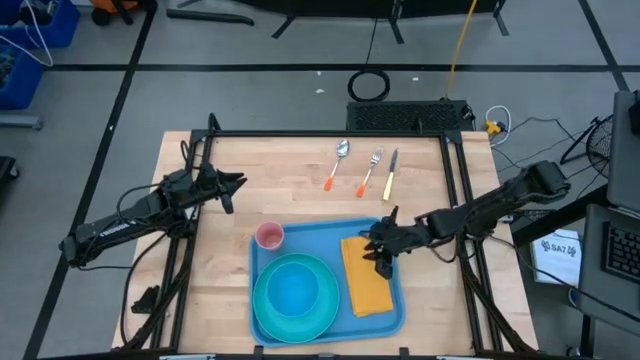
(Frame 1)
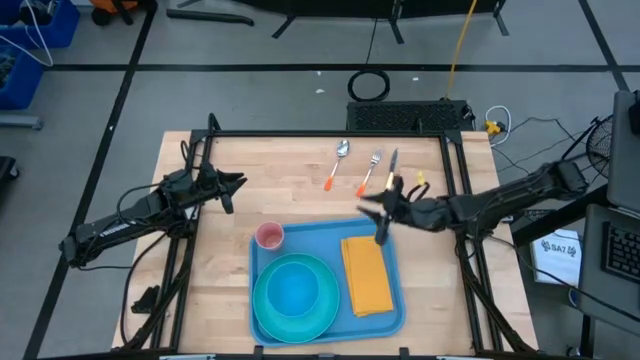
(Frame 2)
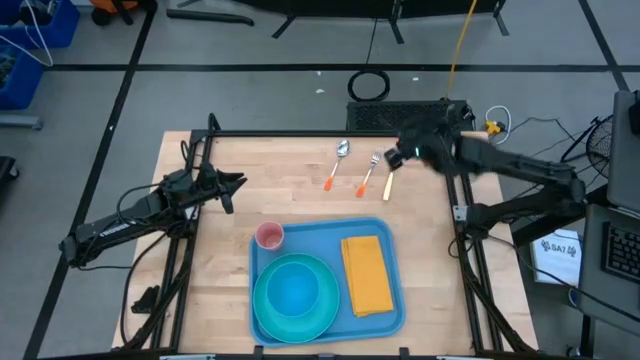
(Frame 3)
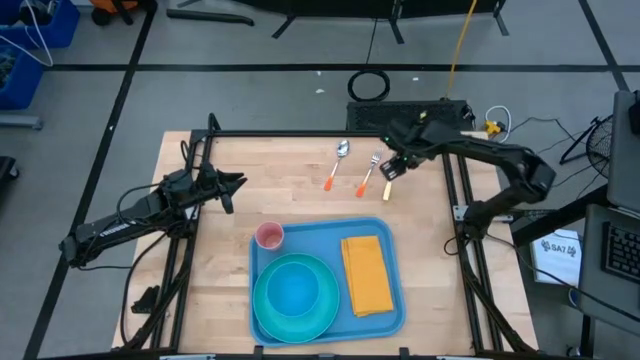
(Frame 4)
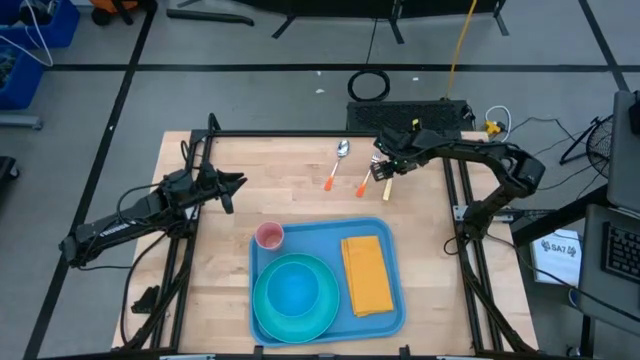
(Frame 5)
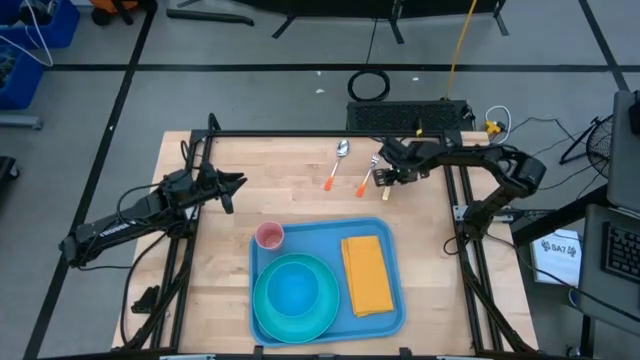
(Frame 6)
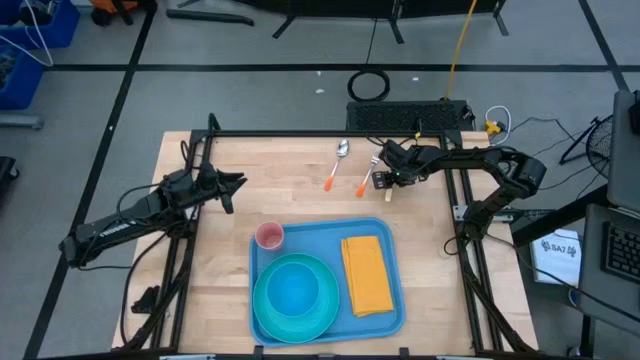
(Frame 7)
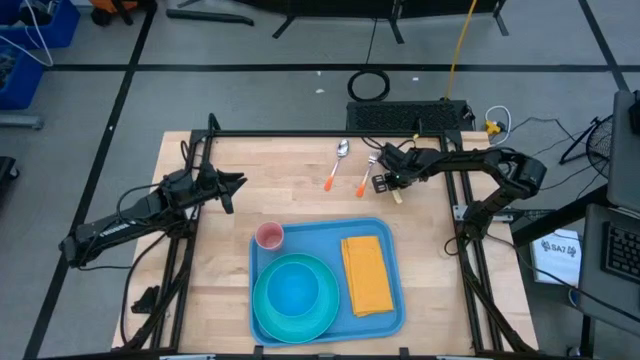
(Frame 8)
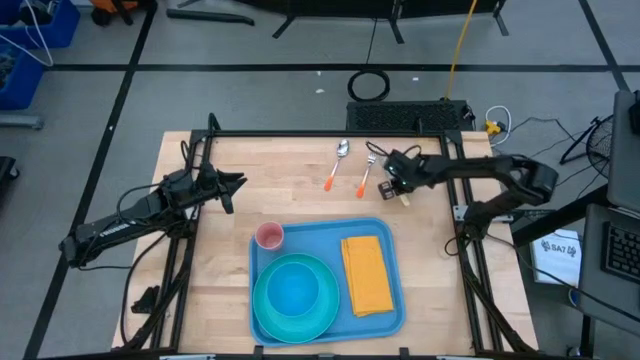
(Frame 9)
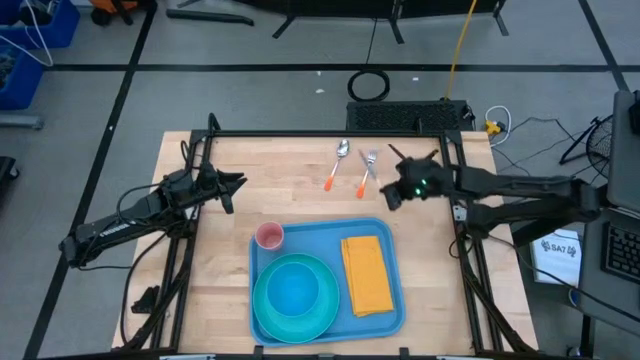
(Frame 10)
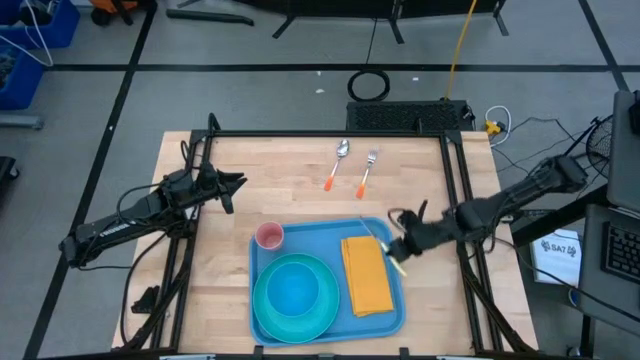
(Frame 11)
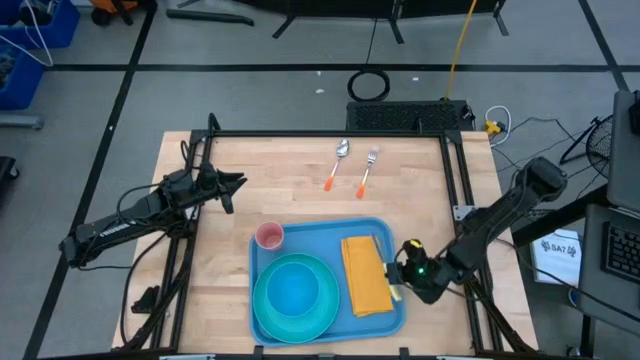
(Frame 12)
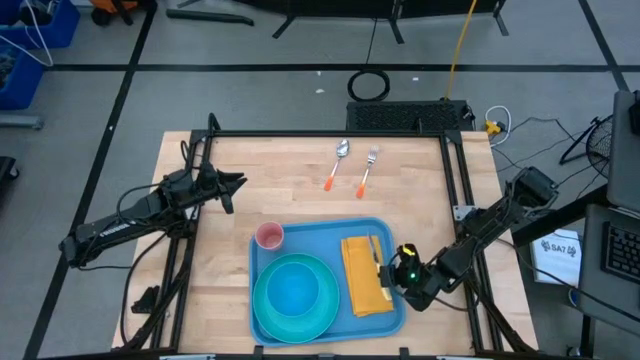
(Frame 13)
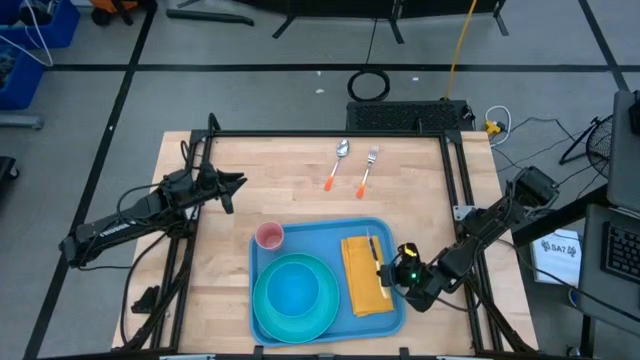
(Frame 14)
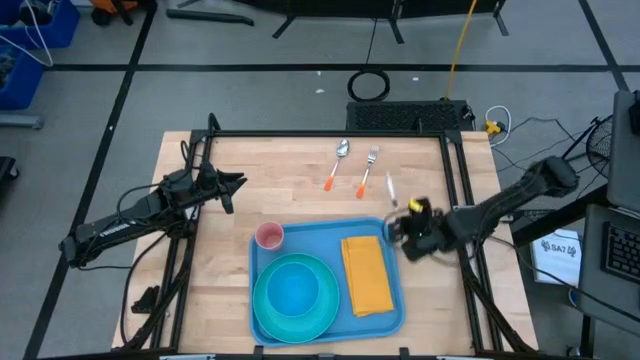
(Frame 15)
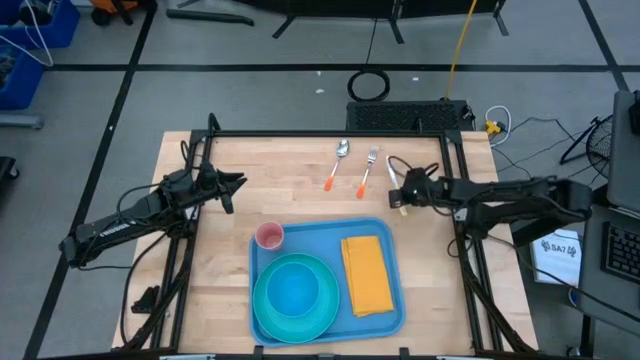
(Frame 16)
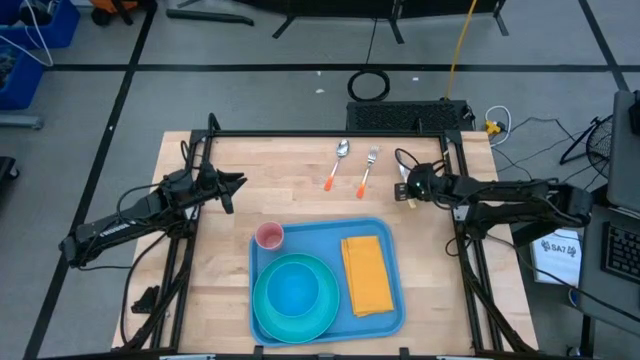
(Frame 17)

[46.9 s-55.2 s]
Task: Set up tray
Put the yellow knife on top of the yellow napkin on the blue tray

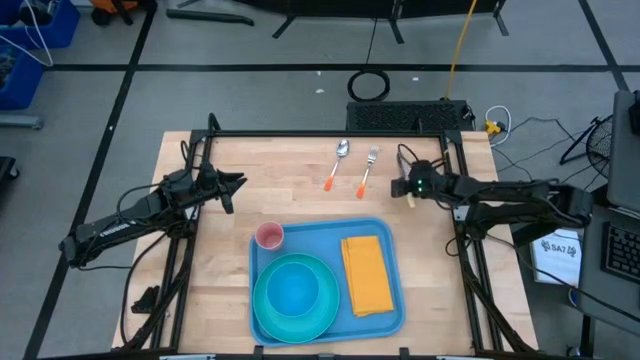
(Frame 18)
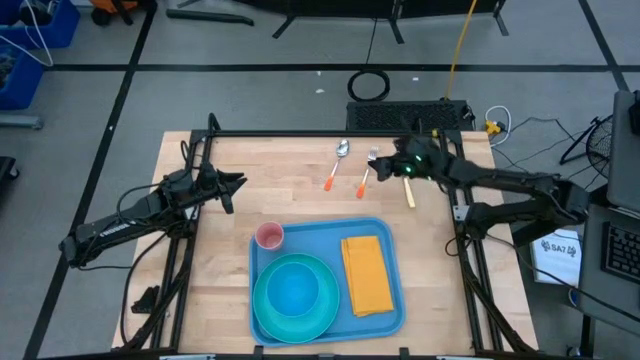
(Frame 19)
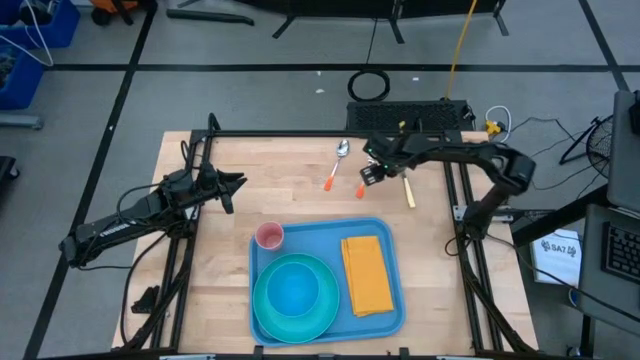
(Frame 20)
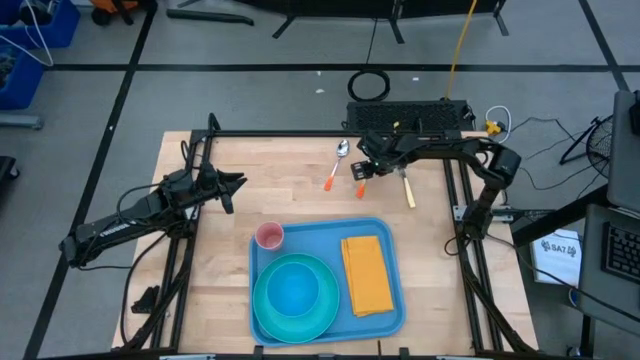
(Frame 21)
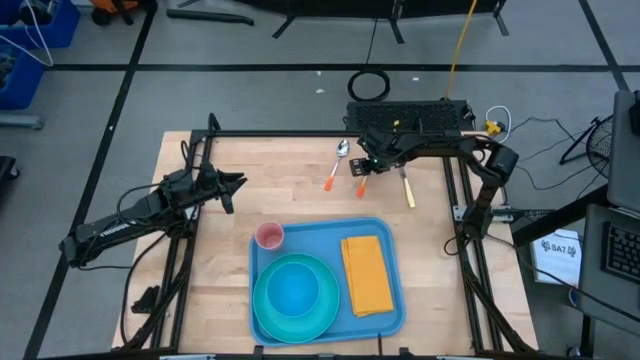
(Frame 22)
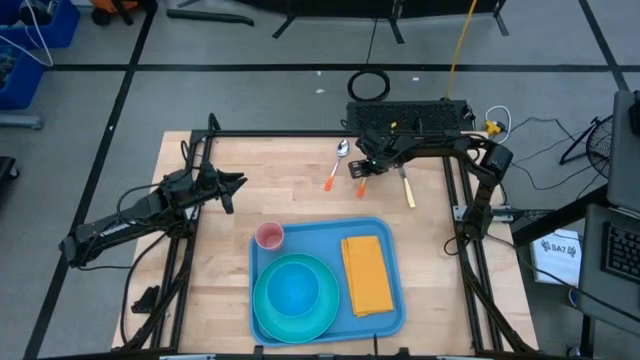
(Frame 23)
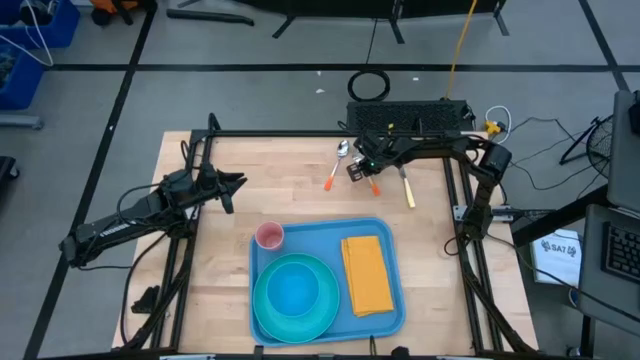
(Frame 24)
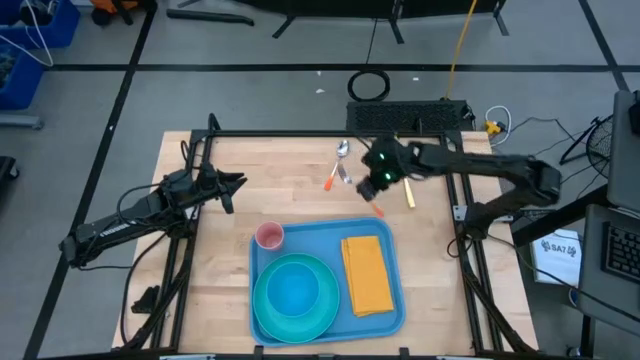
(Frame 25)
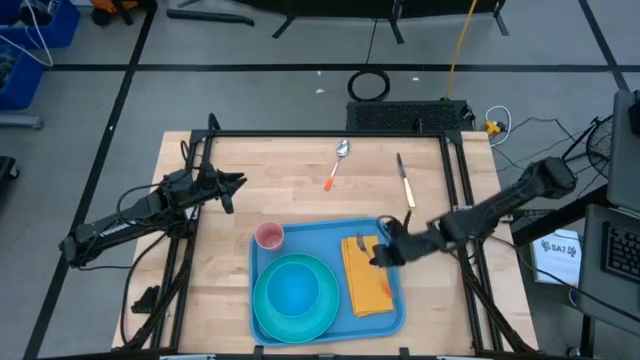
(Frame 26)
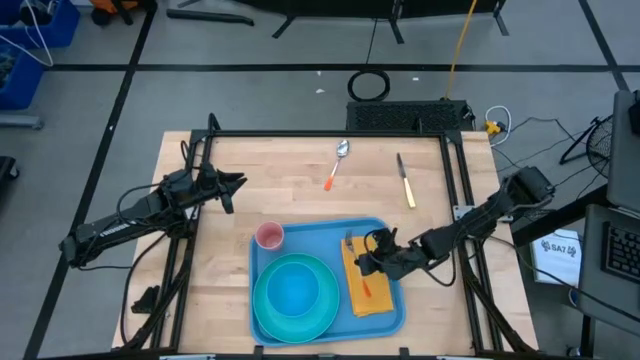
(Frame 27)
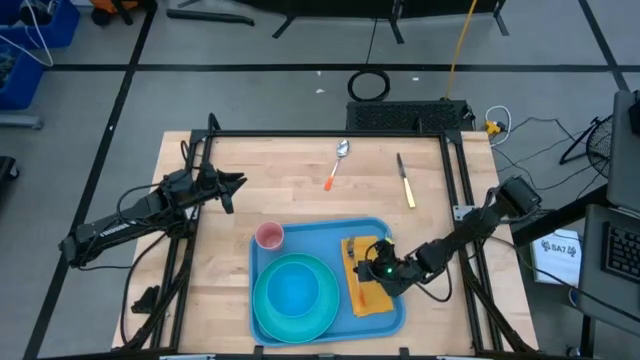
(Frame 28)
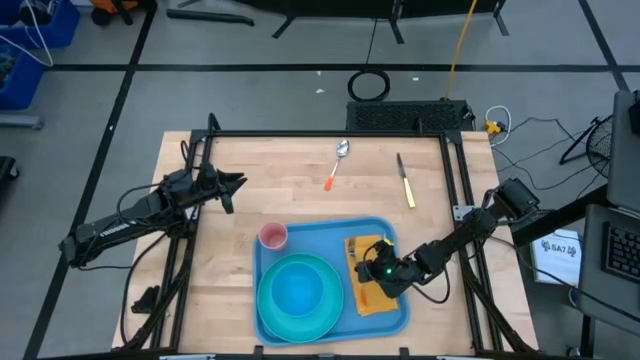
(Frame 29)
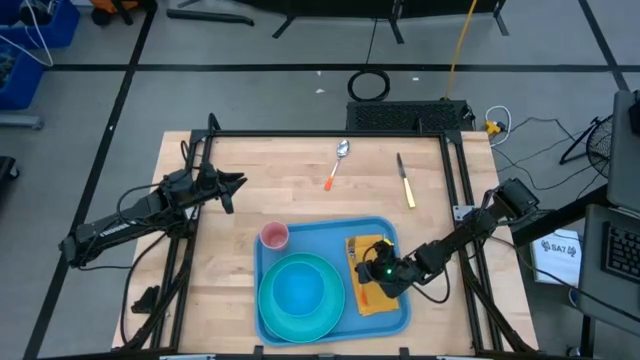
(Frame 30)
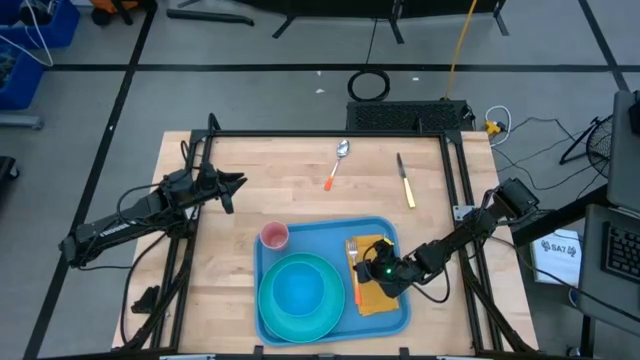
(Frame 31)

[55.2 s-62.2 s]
Put the orange fork on top of the yellow napkin on the blue tray

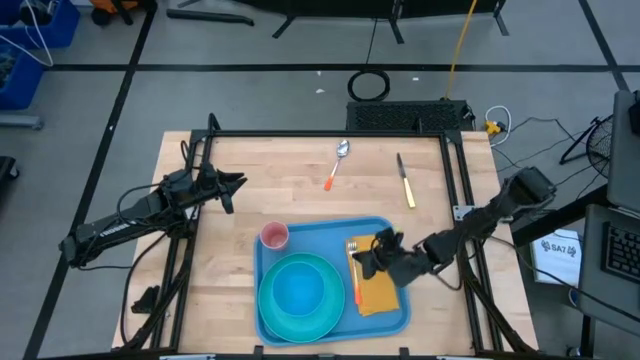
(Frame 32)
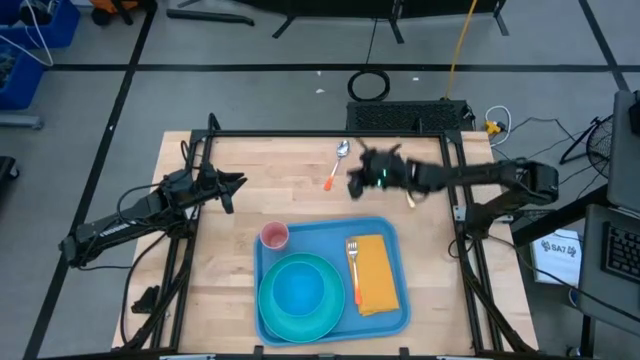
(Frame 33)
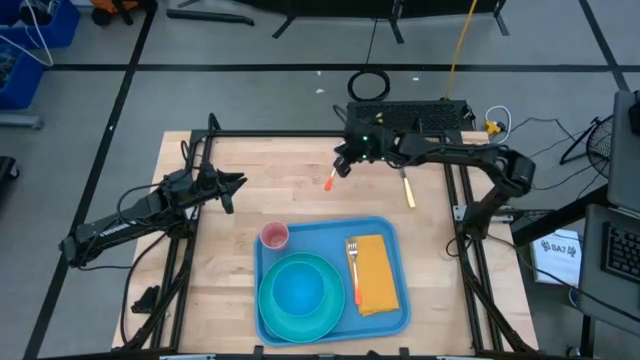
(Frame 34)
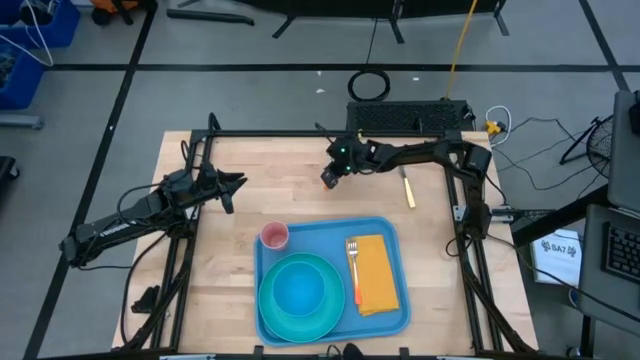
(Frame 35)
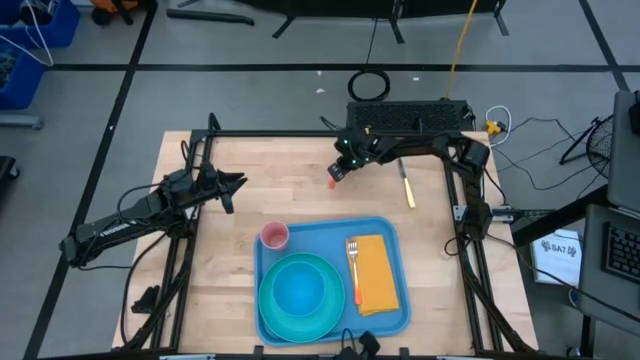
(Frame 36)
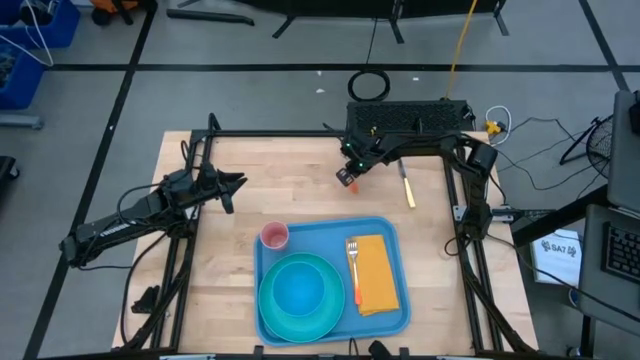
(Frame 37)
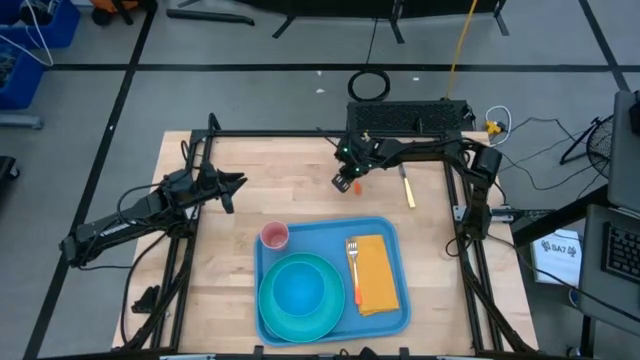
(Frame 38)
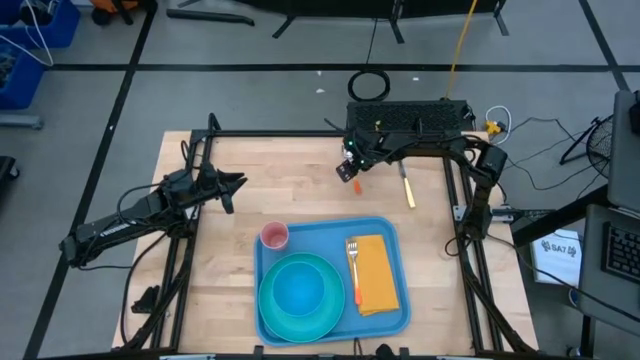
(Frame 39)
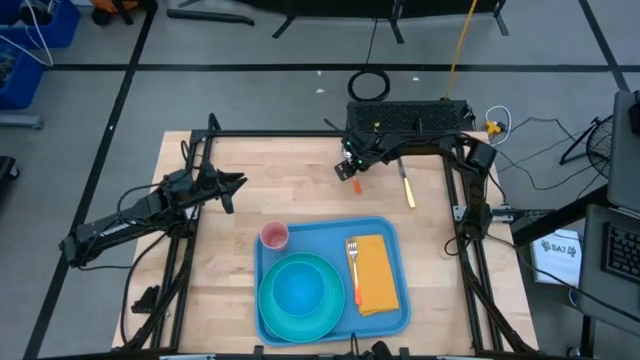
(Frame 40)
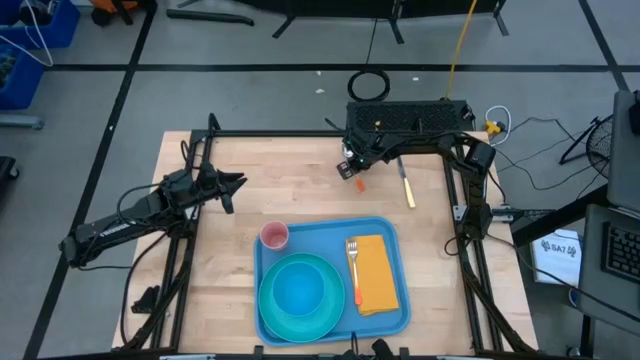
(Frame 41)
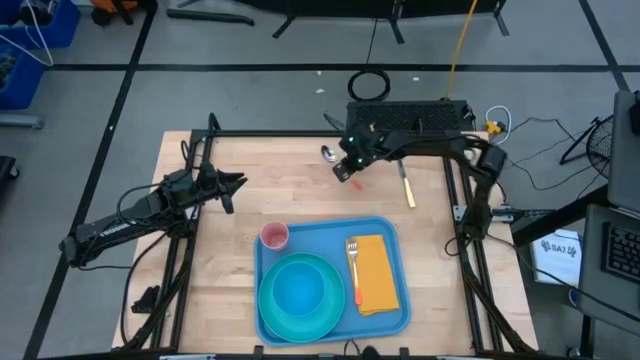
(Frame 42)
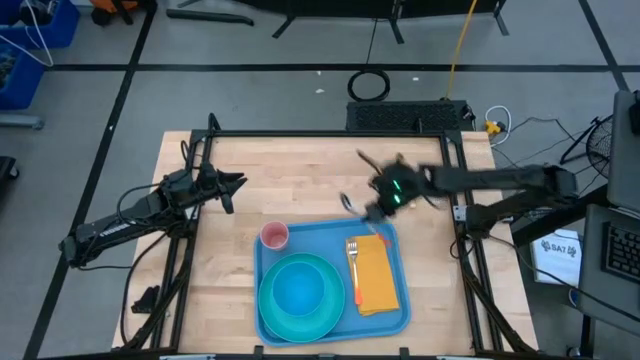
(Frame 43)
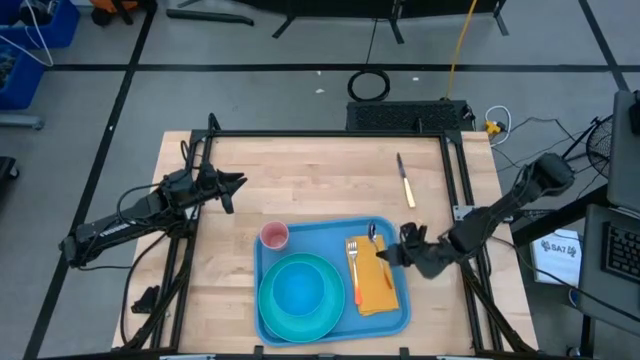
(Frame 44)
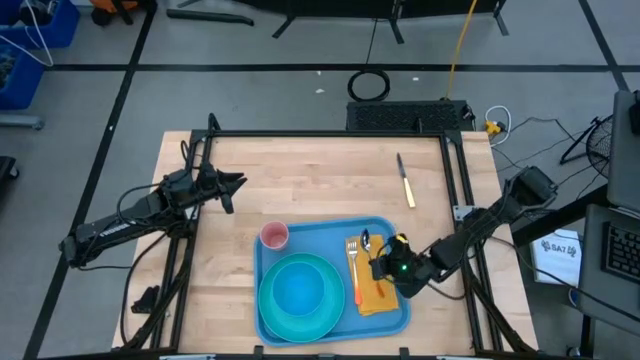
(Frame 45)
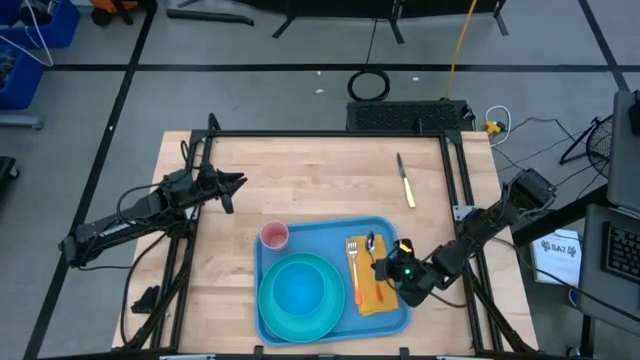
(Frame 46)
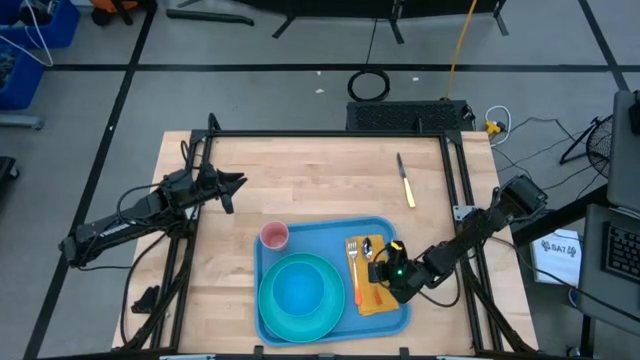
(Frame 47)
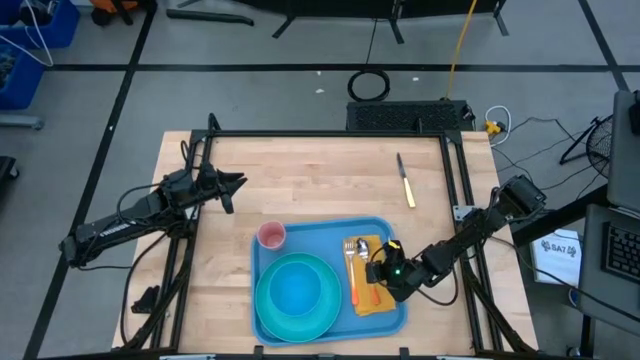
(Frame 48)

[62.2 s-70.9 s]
Put the orange spoon on top of the yellow napkin on the blue tray to the right of the orange fork
